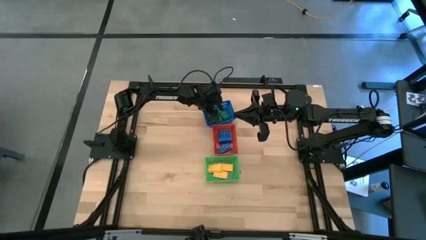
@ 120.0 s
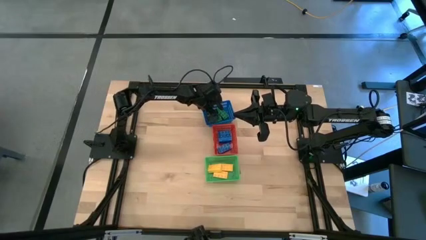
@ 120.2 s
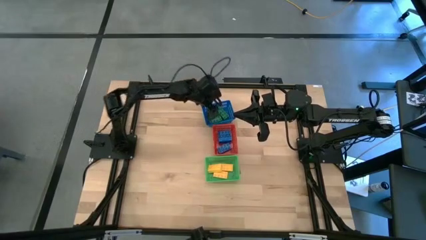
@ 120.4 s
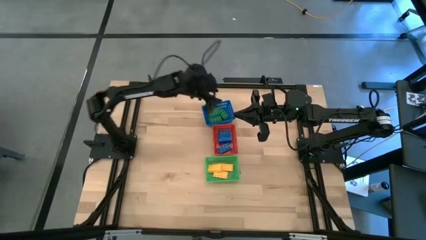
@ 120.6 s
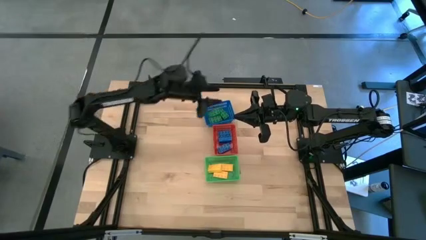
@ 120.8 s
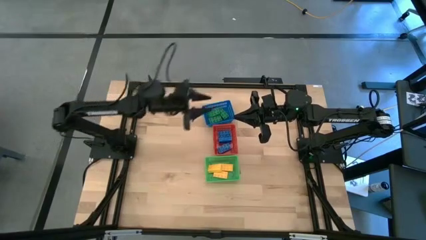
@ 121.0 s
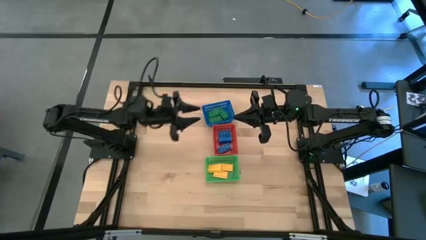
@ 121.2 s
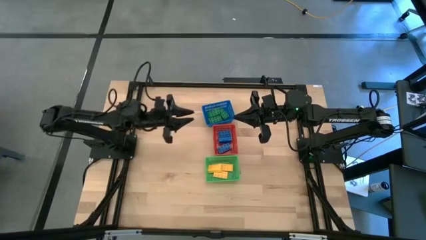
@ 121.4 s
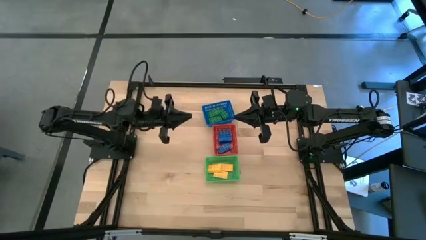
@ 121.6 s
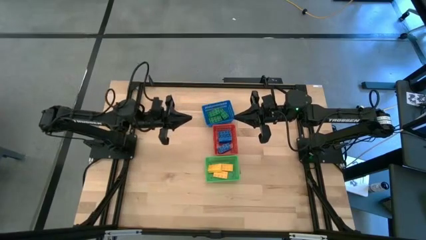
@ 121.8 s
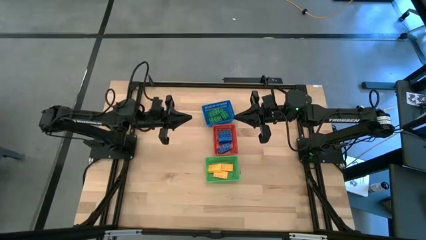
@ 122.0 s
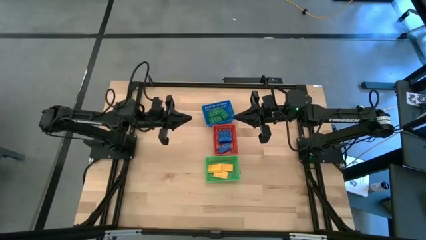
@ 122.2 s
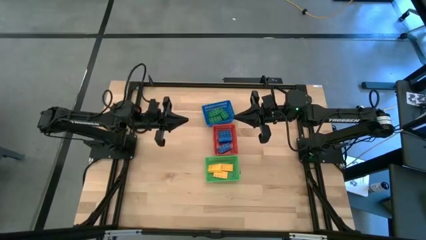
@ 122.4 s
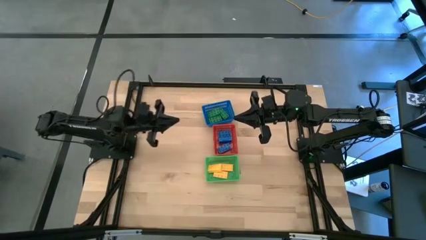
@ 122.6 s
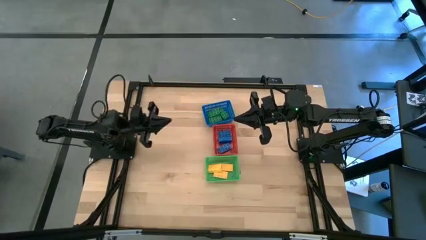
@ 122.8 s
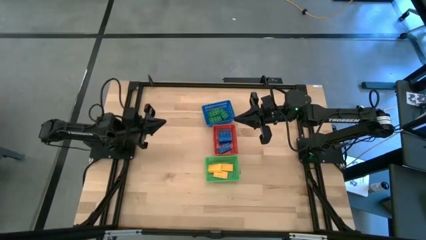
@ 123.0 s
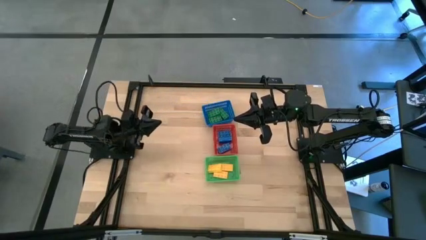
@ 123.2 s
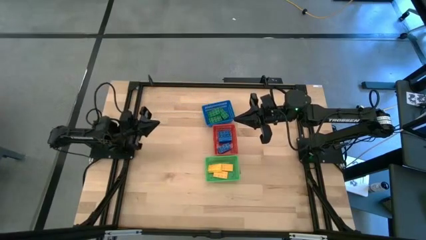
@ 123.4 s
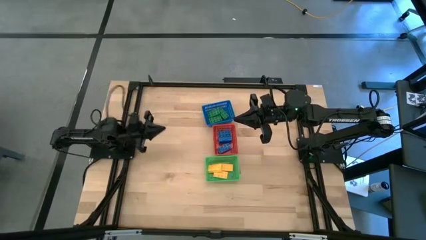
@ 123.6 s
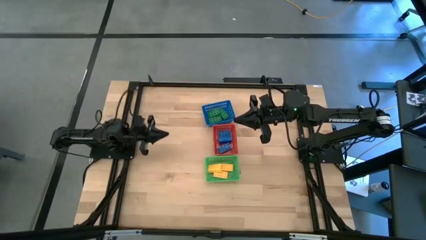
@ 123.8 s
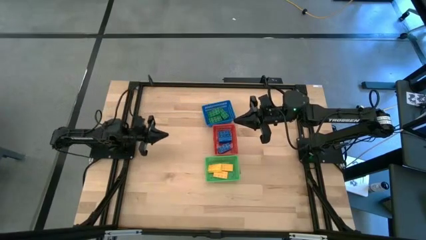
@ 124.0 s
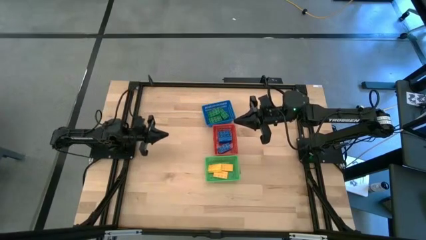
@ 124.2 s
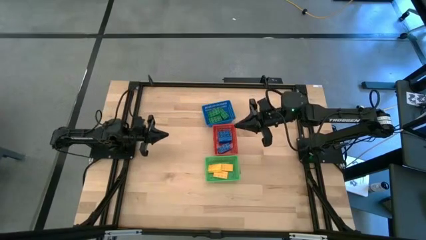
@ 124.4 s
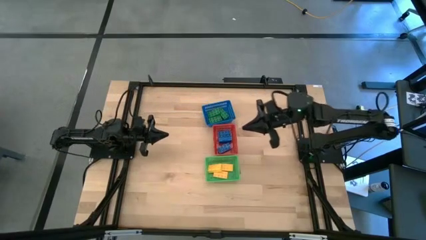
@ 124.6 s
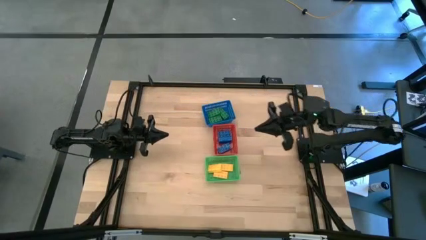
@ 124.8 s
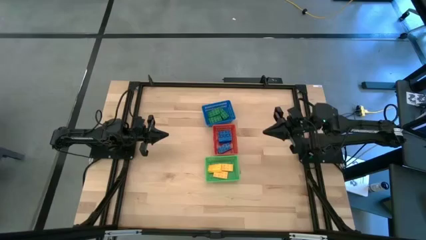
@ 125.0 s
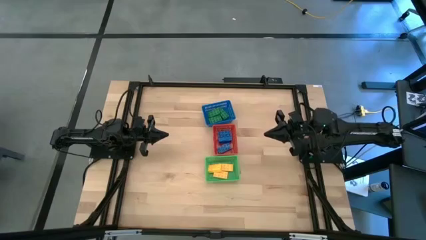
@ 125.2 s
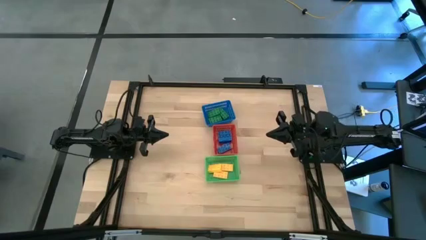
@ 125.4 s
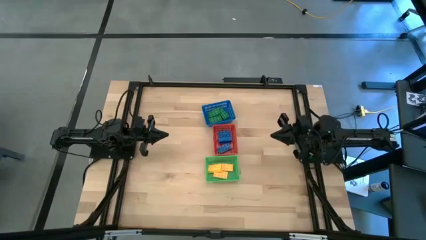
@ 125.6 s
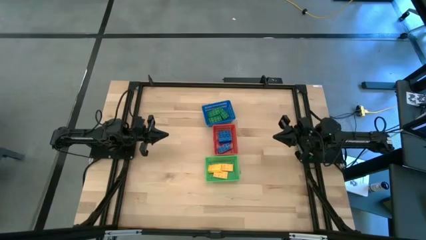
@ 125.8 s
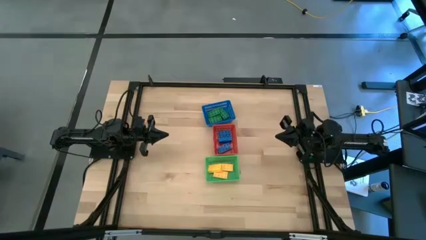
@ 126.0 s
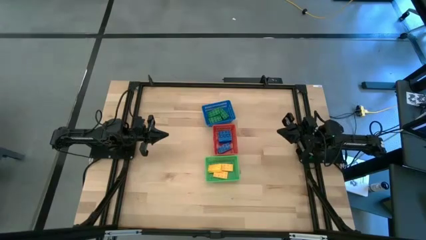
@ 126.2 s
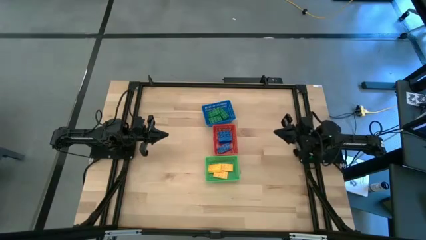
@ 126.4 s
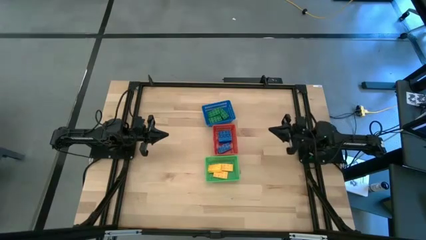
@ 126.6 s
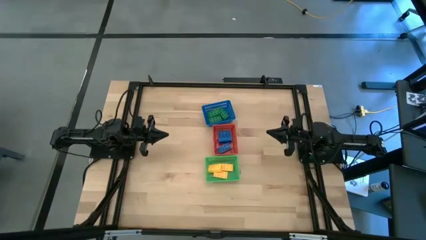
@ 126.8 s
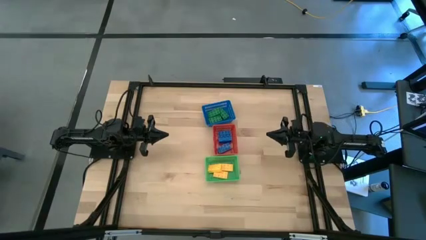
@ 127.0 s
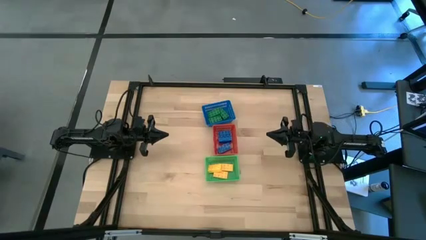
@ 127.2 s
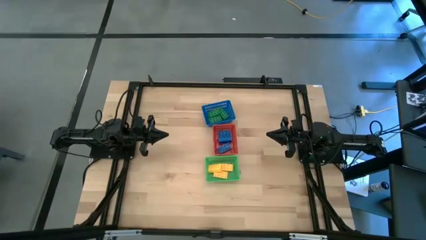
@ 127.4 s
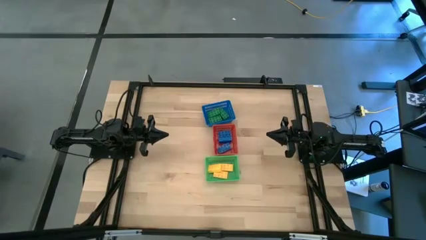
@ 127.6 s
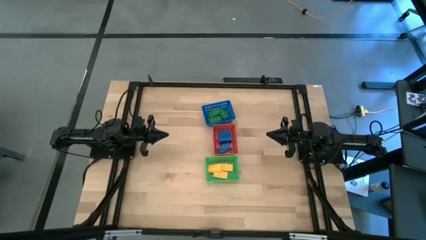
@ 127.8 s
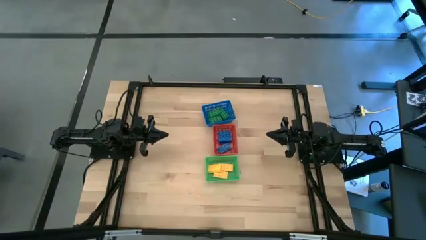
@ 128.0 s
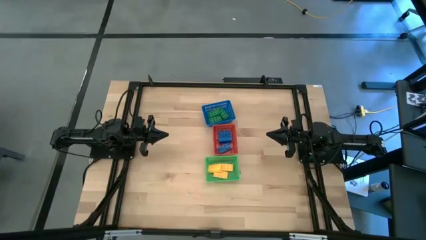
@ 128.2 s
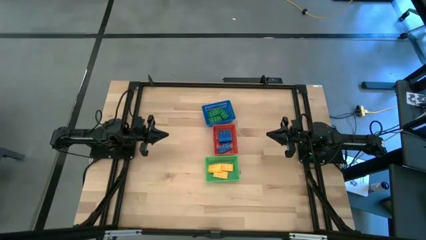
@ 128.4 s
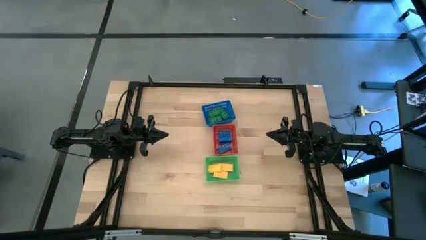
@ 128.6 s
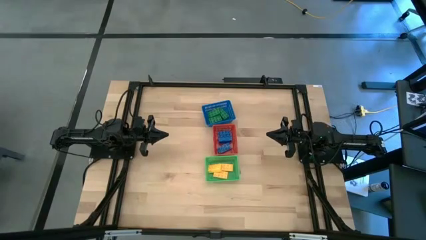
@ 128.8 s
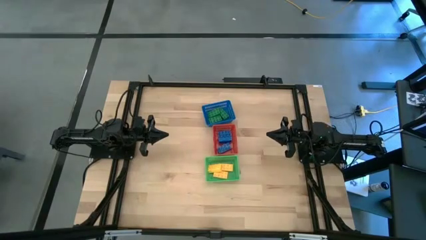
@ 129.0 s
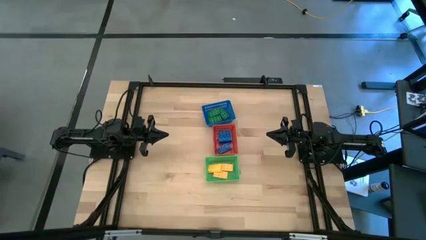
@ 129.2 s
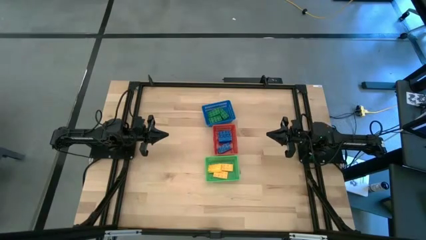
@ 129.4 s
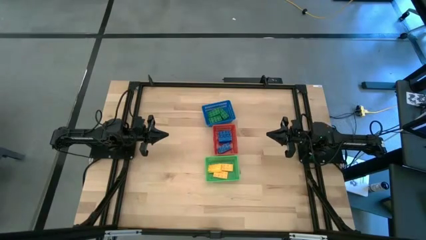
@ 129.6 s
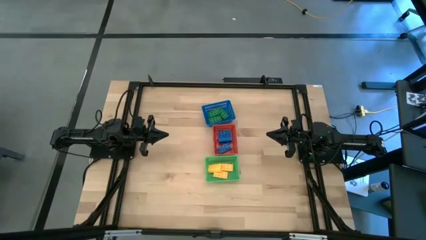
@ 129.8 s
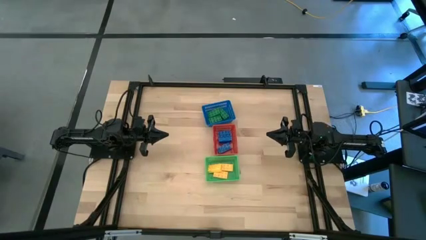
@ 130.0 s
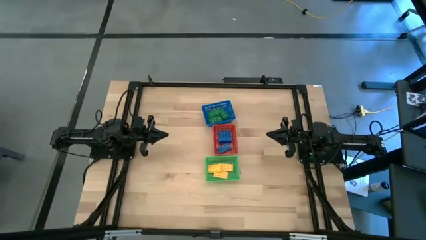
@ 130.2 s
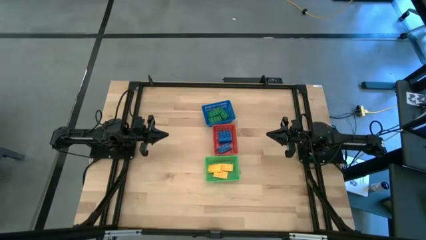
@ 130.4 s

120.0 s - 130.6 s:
Task: Sort & place blocks by color
Return to Home Position
